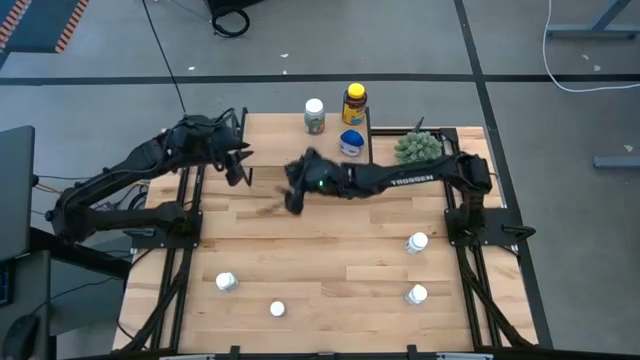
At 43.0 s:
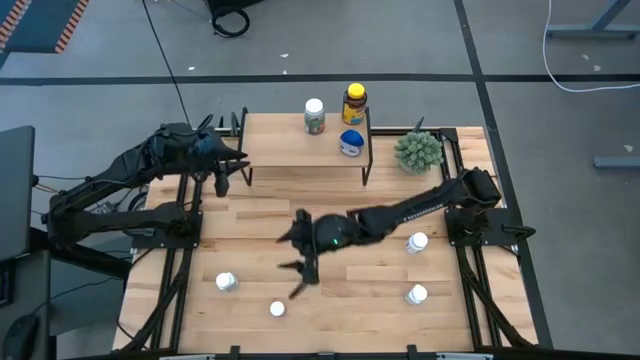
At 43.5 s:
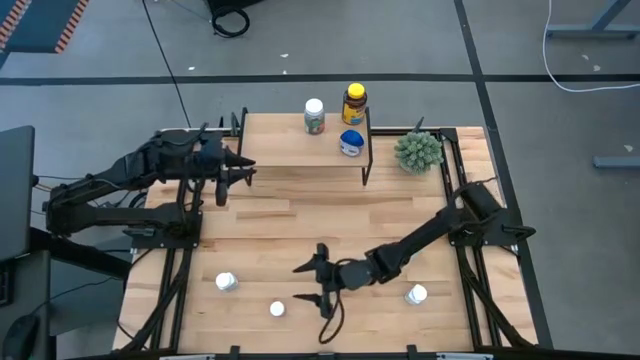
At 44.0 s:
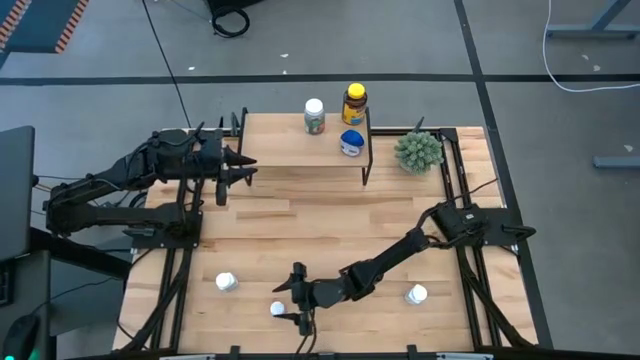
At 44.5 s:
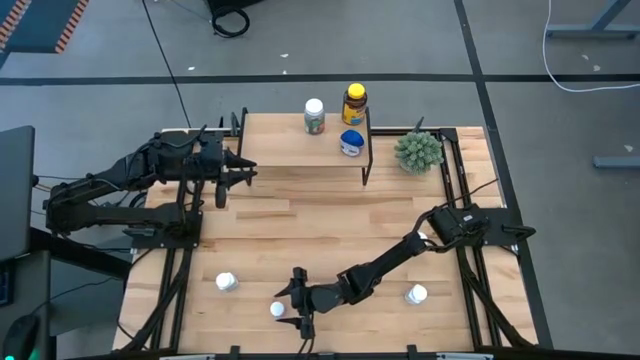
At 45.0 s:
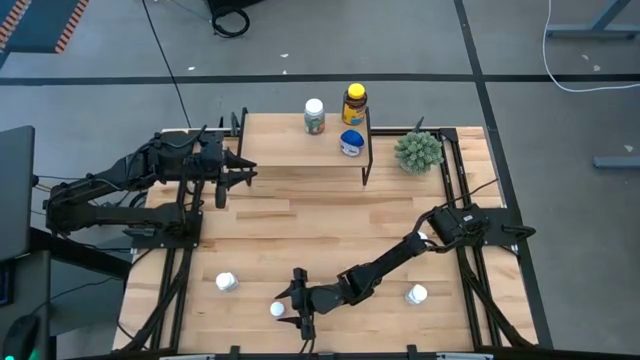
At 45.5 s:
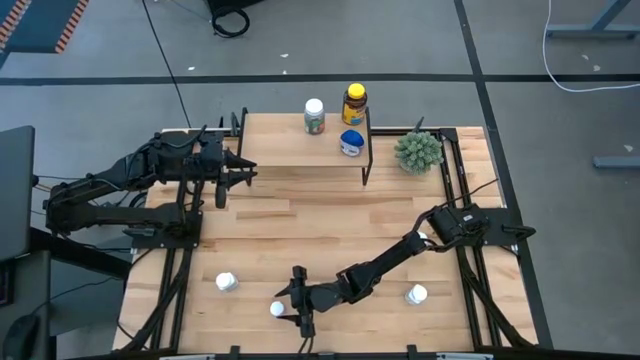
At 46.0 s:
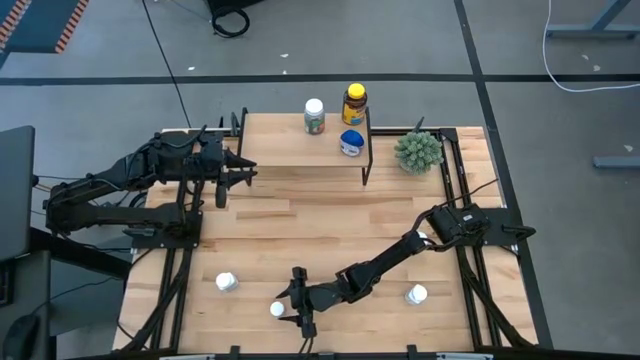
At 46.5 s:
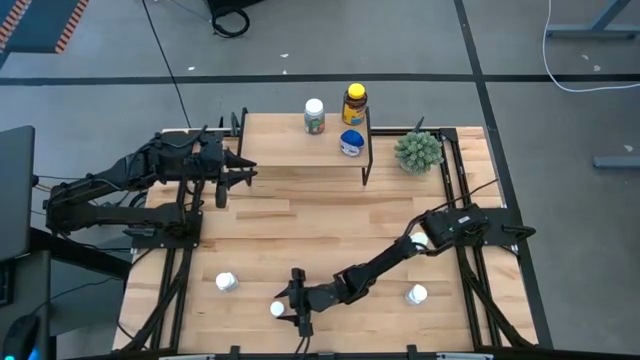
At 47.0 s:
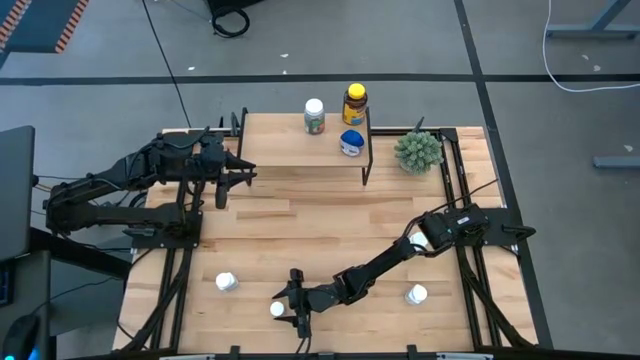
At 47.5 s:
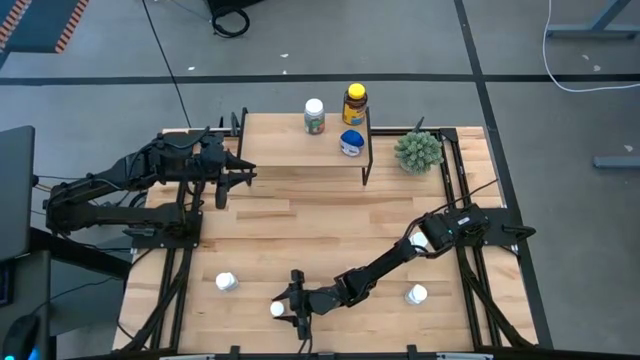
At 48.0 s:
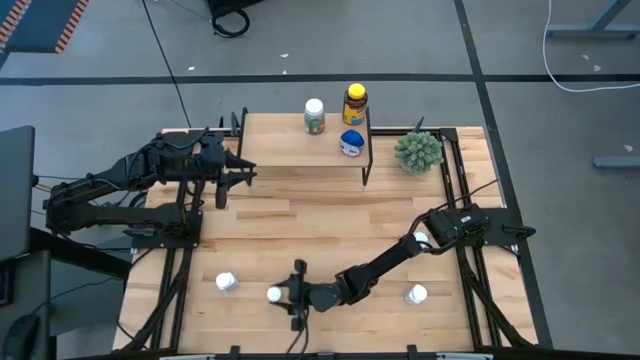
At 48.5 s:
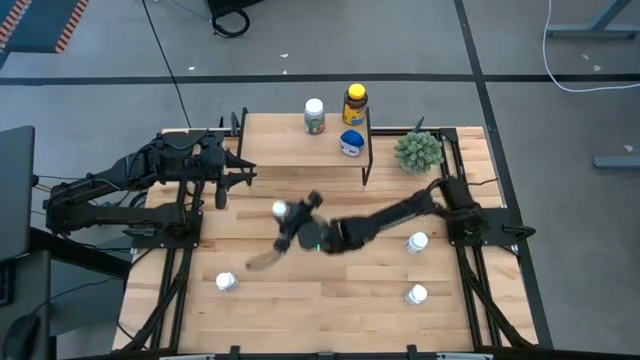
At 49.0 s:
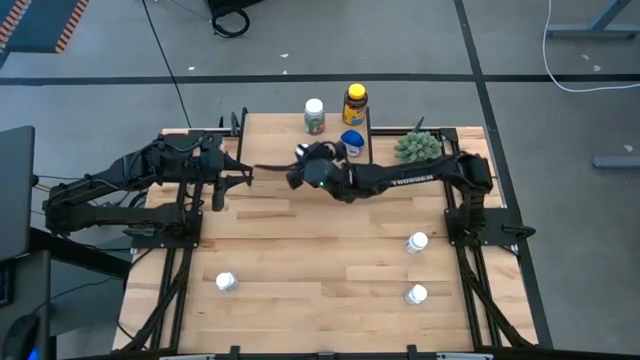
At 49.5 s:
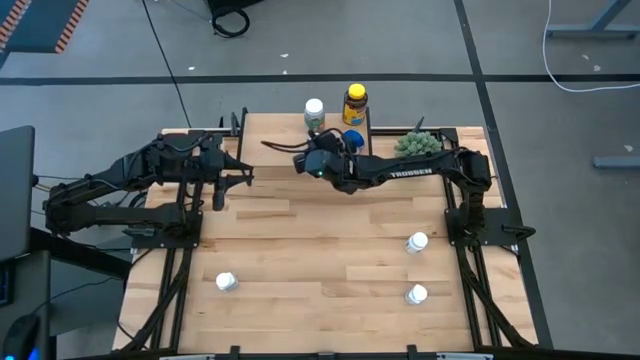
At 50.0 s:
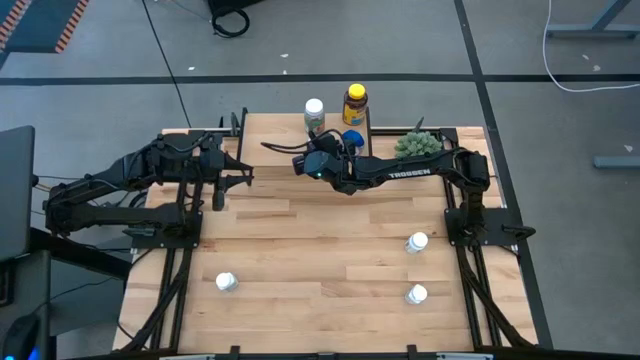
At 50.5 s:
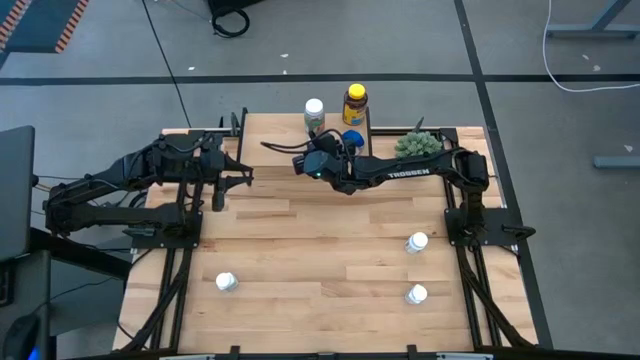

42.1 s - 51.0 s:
Task: Pick and place medicine bottles onto shelf by color
Put the pink pill bottle on the shelf

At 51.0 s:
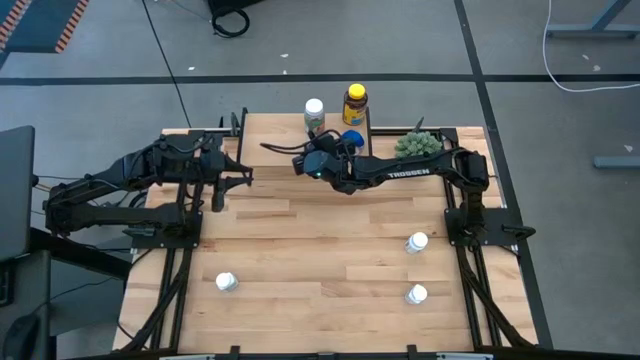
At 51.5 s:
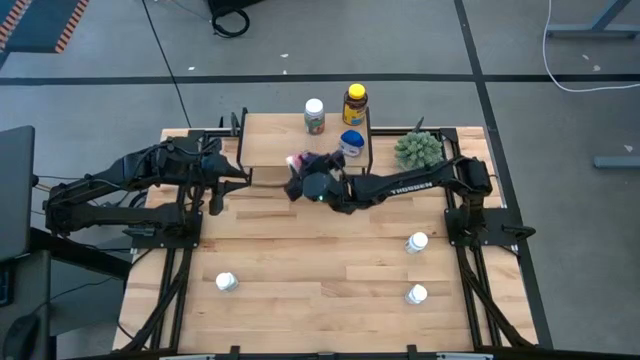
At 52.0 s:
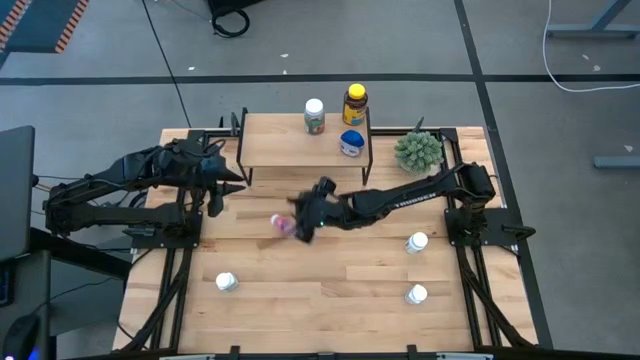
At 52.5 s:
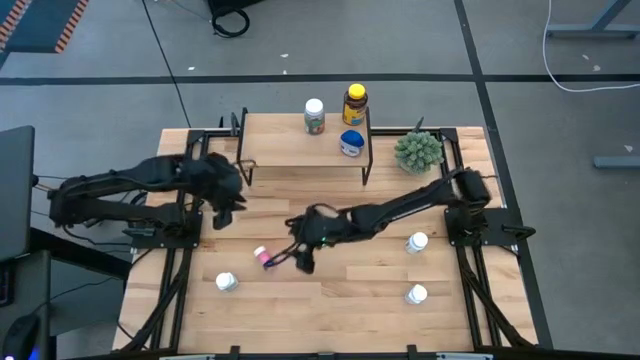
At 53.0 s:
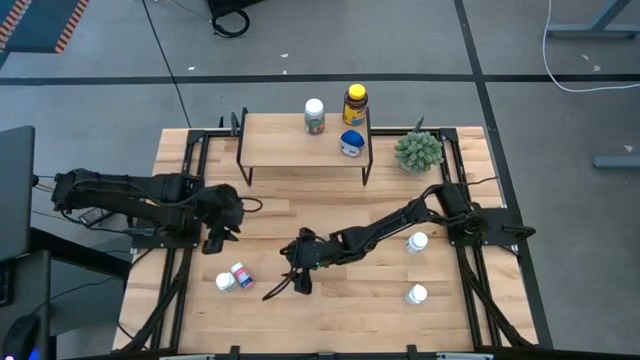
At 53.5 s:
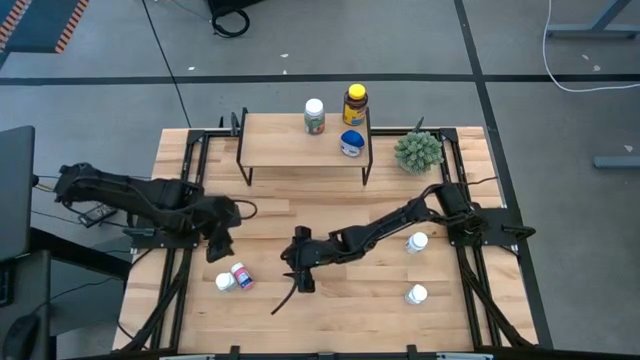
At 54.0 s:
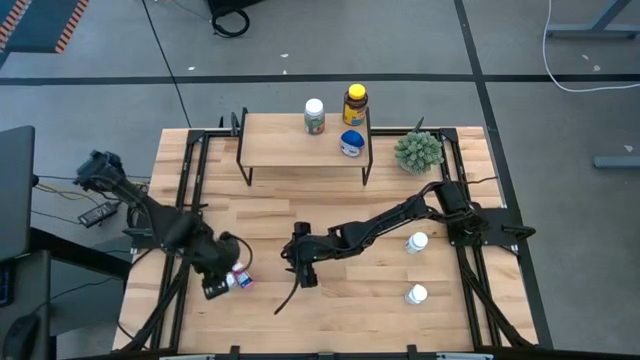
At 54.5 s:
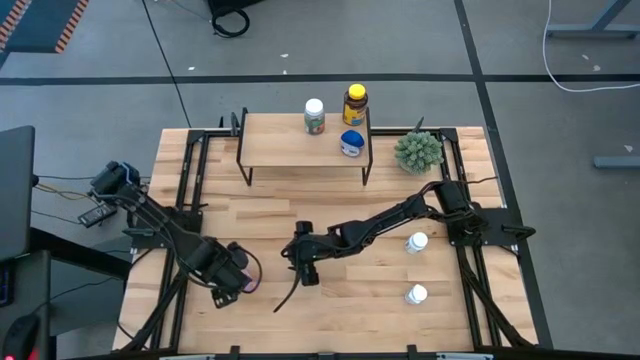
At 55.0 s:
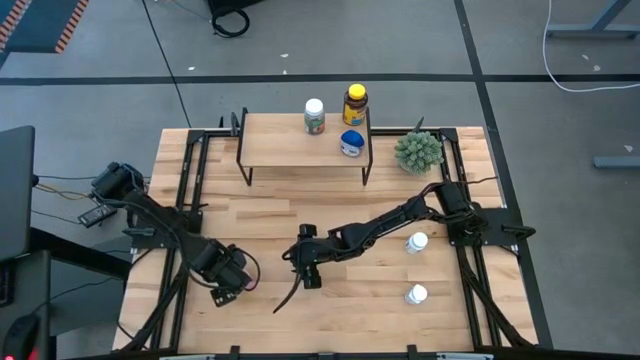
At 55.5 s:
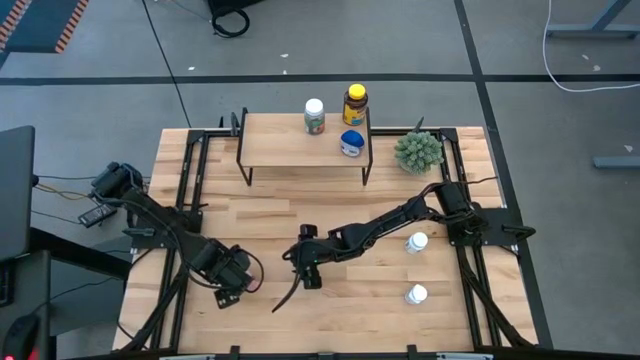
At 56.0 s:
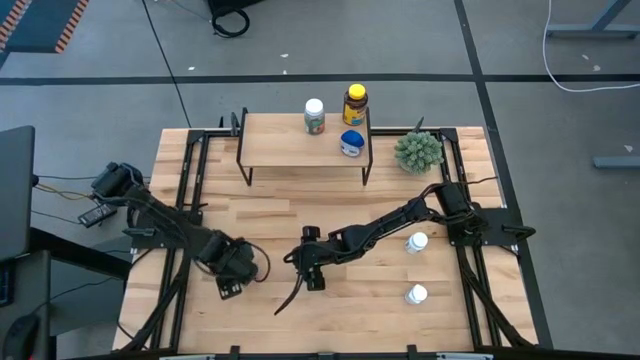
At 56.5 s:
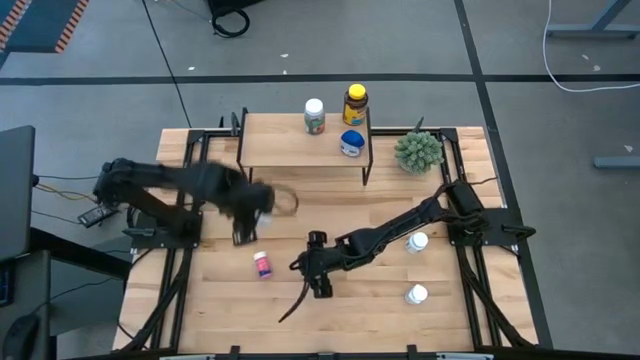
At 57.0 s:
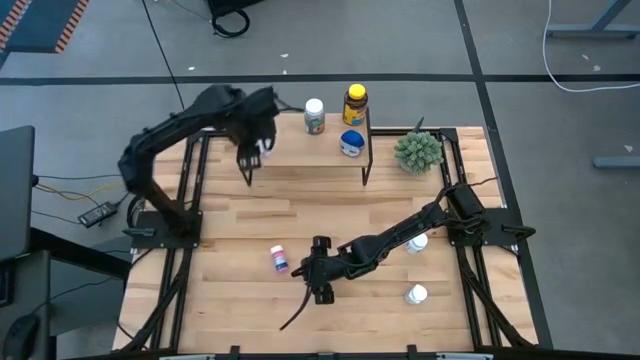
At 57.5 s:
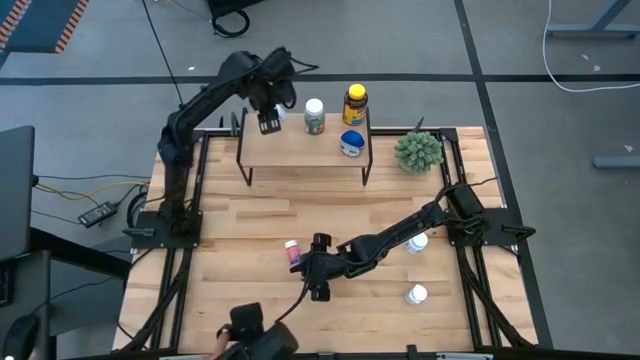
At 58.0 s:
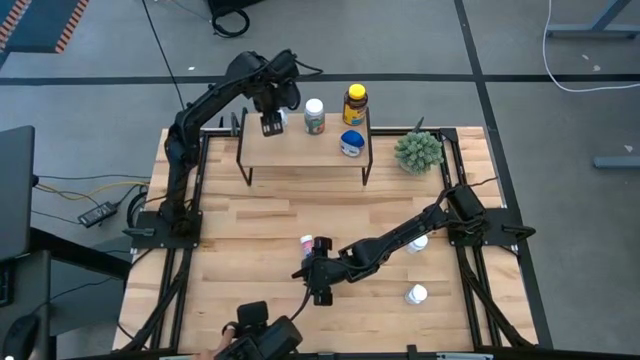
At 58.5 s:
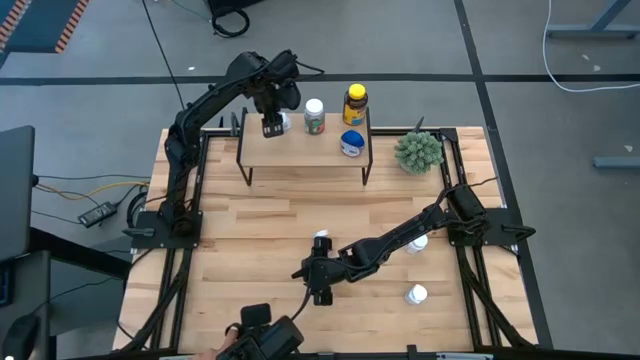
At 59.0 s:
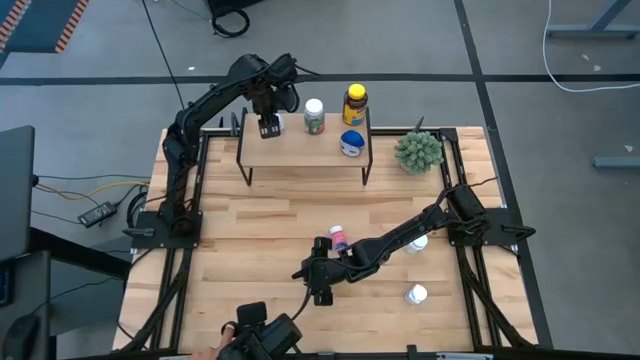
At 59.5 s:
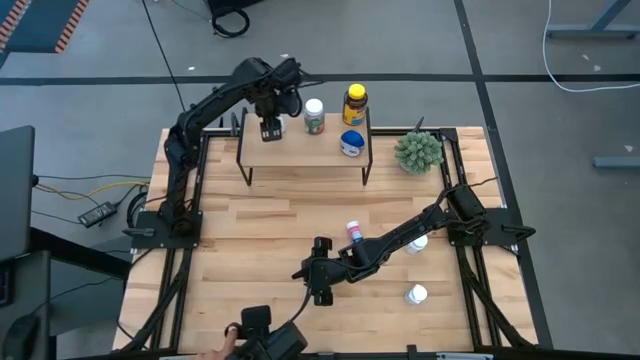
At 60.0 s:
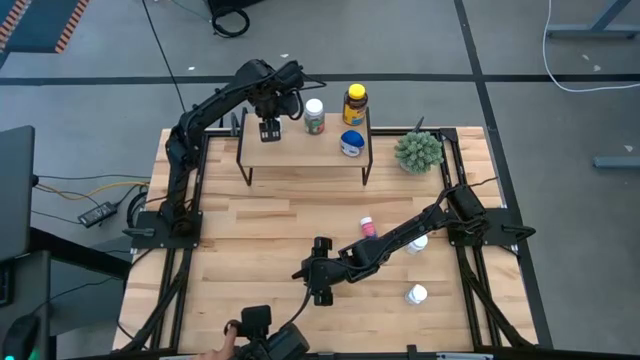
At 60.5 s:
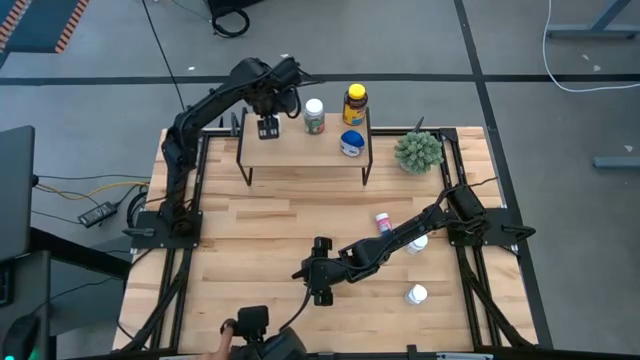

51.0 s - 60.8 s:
Put the bottom left white pill bottle on the shelf

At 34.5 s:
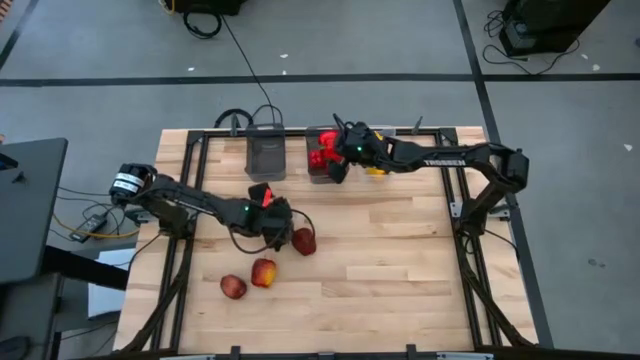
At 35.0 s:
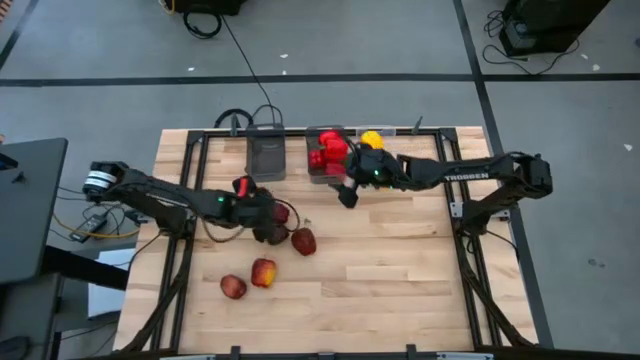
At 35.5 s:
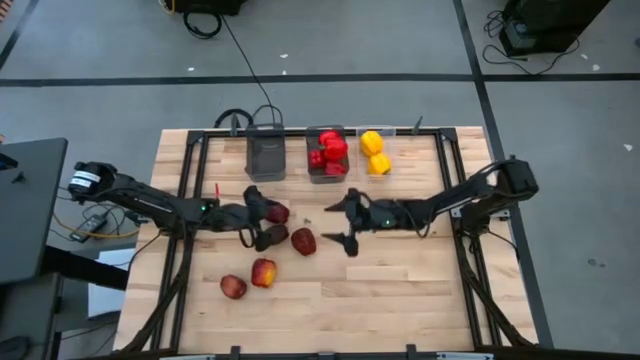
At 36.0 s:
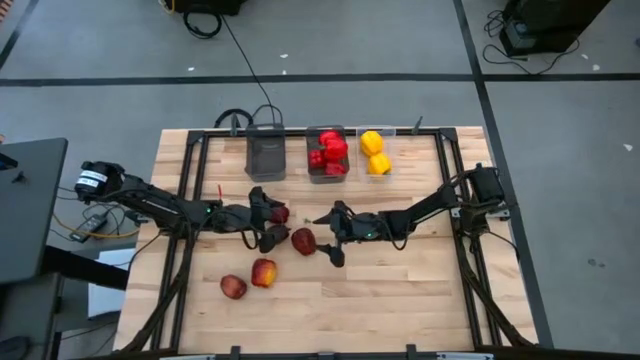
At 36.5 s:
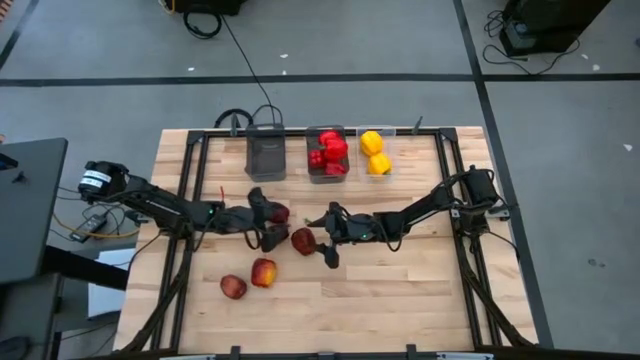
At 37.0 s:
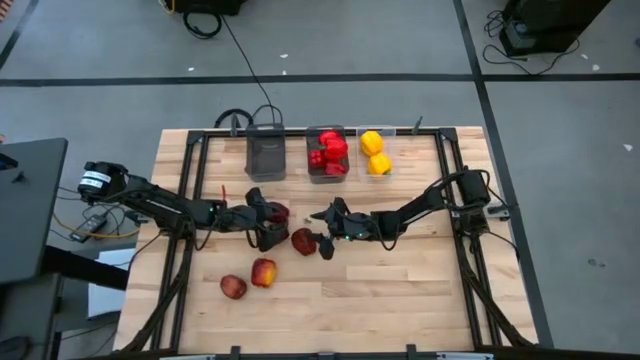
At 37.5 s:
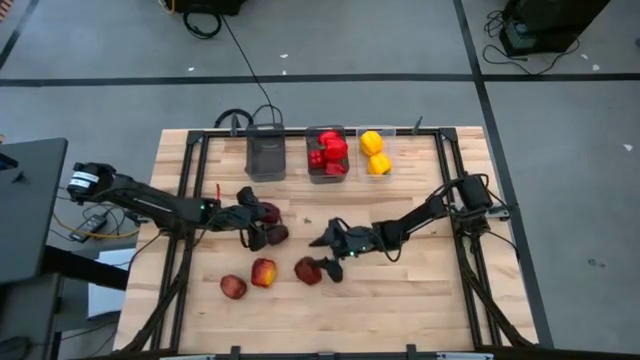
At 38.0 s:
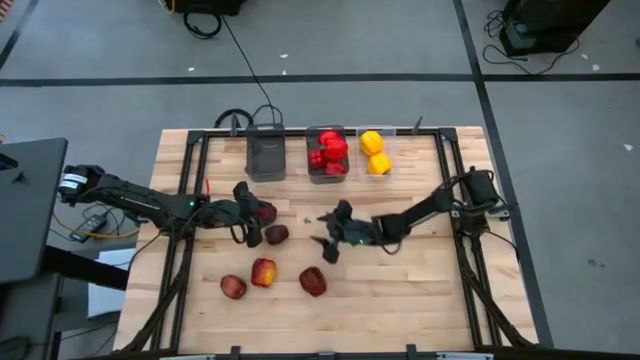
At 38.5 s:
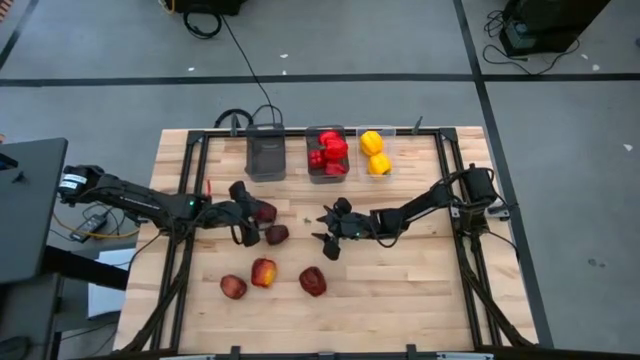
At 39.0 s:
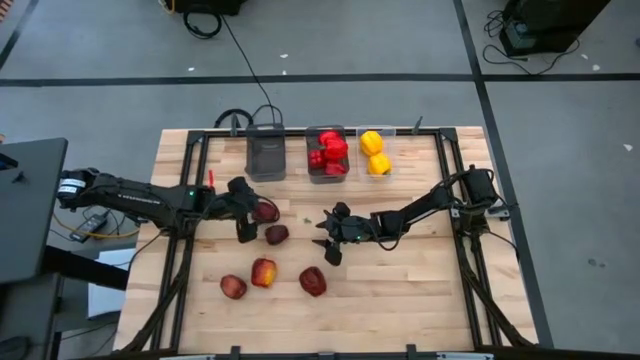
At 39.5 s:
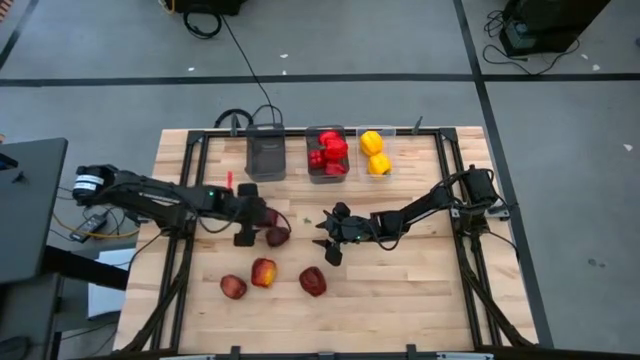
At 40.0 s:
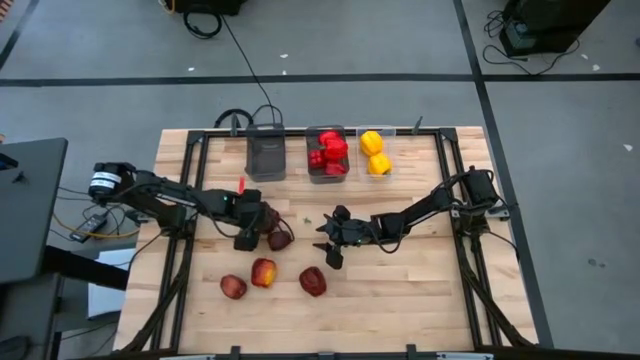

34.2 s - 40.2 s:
Task: Sort produce into baskets
Put the dark red apple into the left black bin
